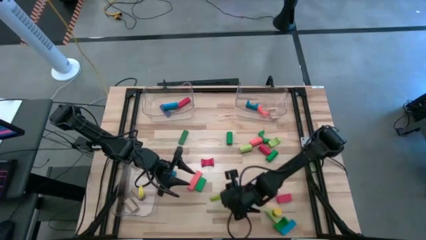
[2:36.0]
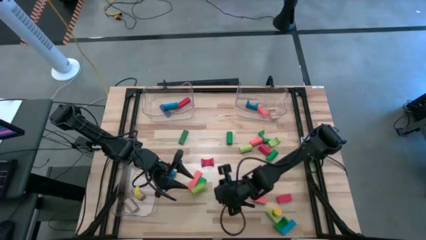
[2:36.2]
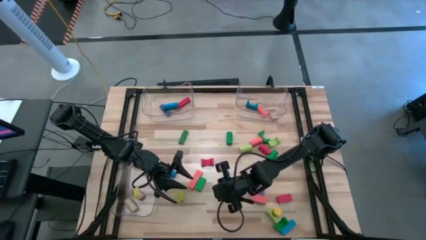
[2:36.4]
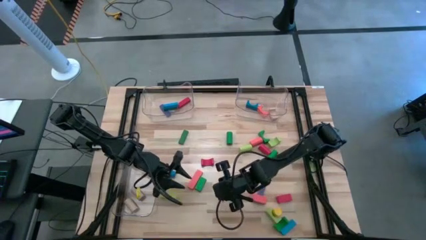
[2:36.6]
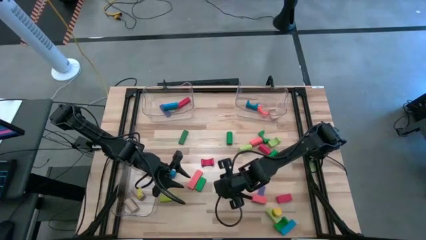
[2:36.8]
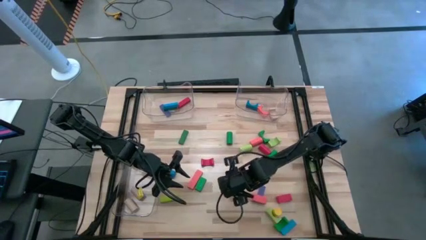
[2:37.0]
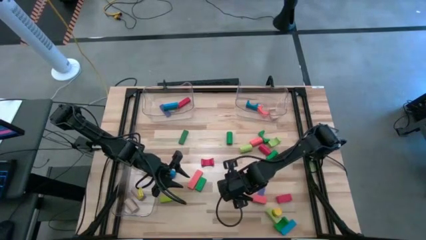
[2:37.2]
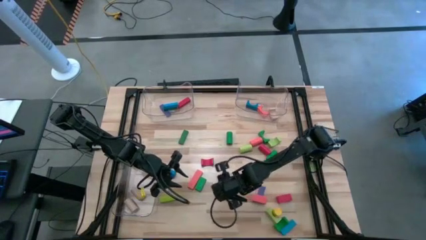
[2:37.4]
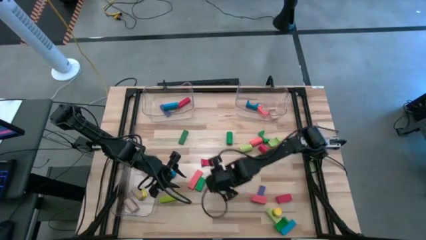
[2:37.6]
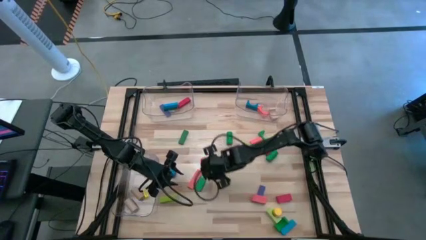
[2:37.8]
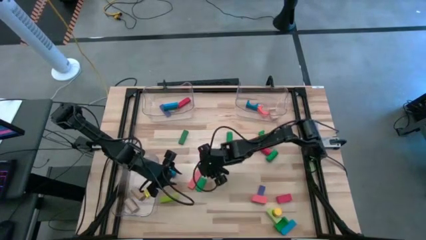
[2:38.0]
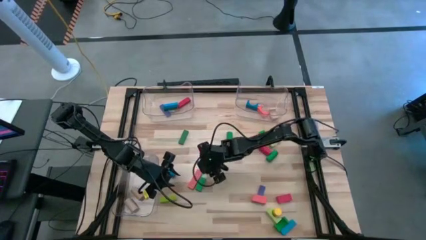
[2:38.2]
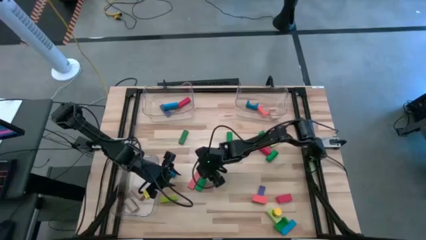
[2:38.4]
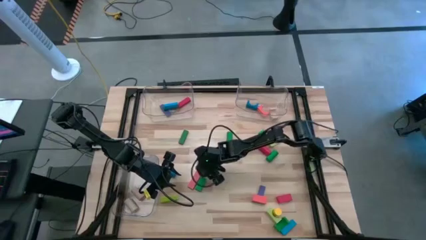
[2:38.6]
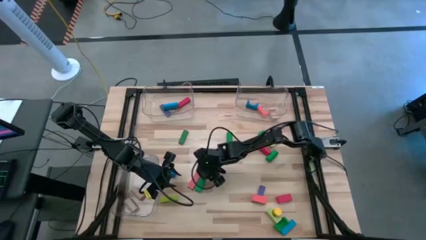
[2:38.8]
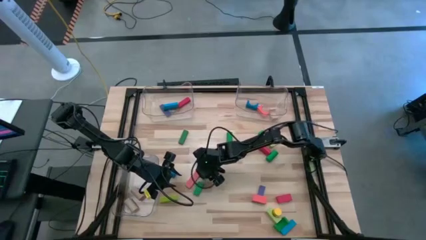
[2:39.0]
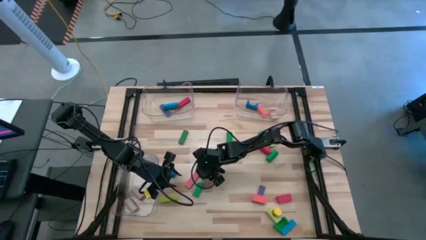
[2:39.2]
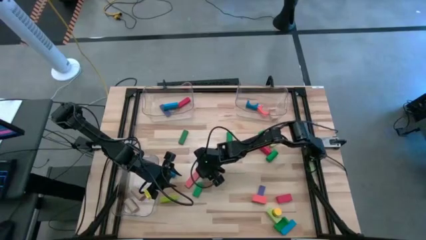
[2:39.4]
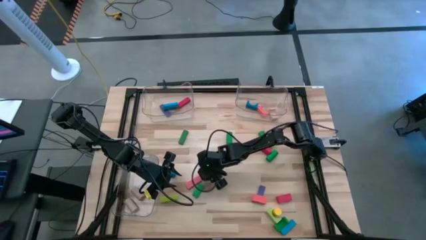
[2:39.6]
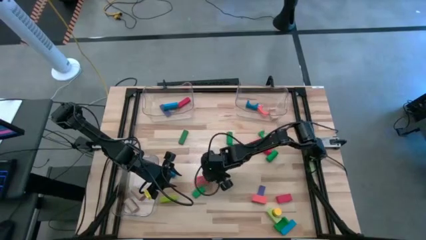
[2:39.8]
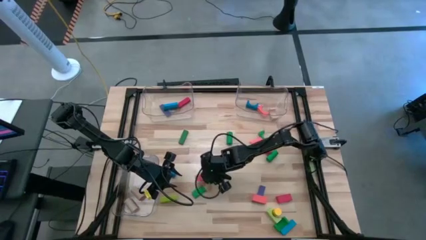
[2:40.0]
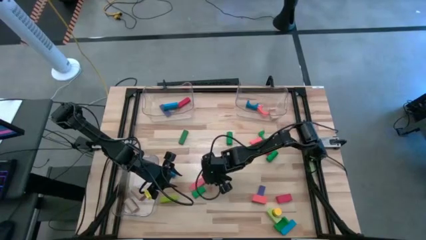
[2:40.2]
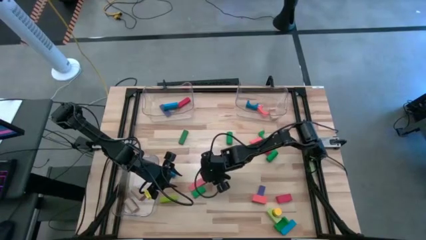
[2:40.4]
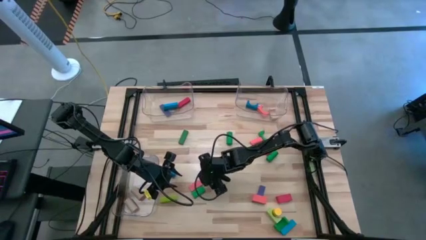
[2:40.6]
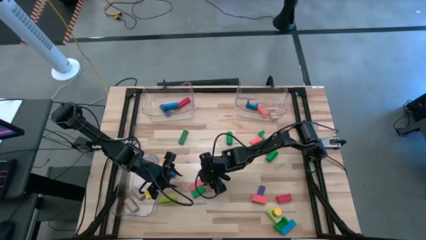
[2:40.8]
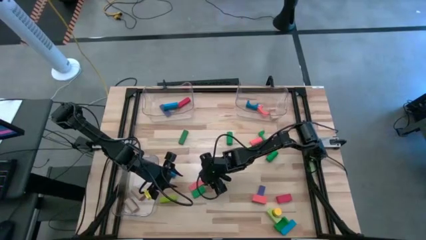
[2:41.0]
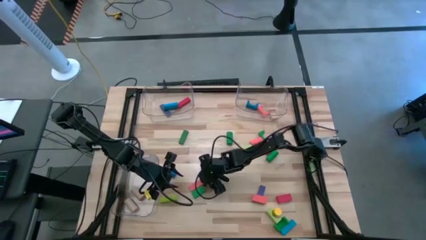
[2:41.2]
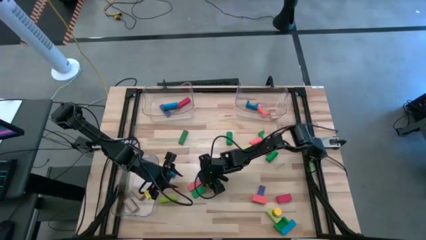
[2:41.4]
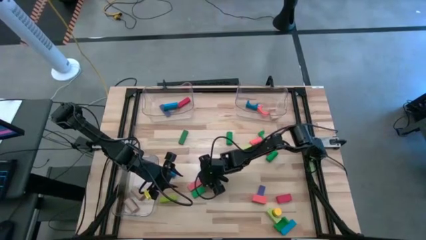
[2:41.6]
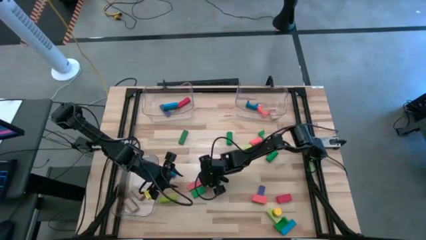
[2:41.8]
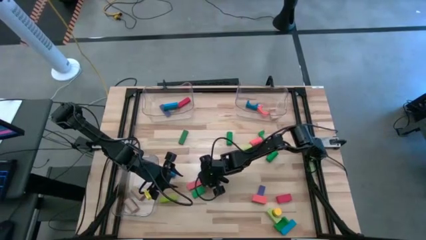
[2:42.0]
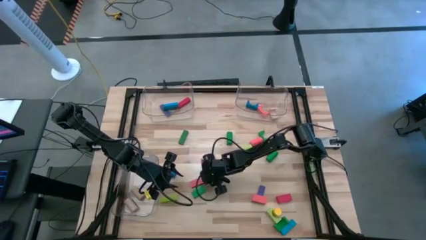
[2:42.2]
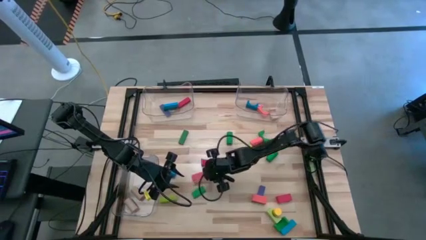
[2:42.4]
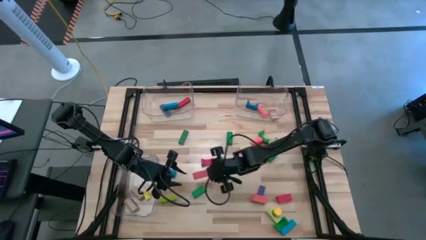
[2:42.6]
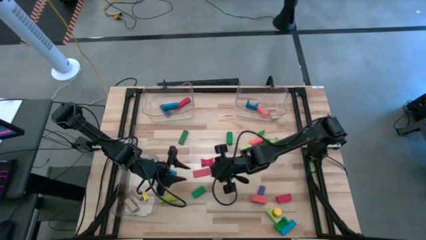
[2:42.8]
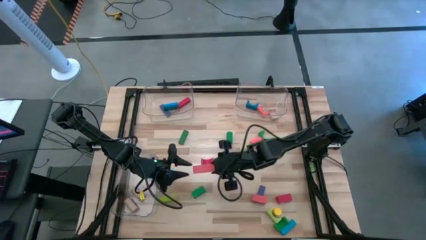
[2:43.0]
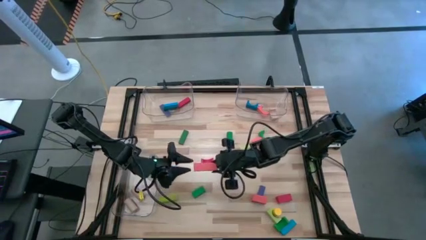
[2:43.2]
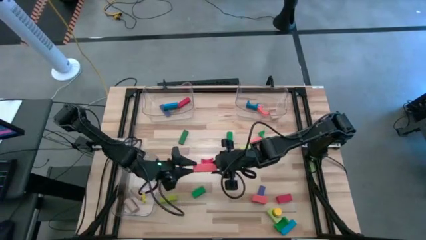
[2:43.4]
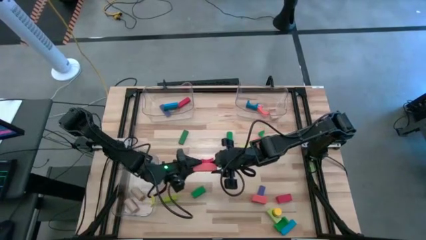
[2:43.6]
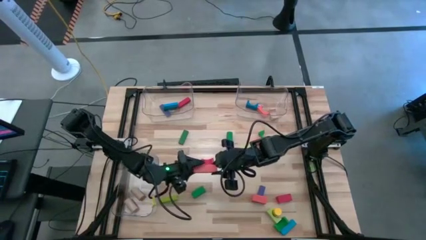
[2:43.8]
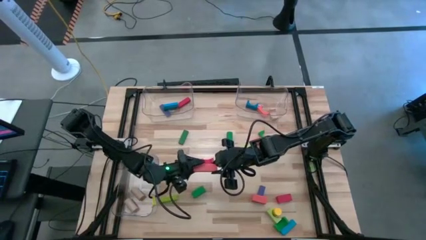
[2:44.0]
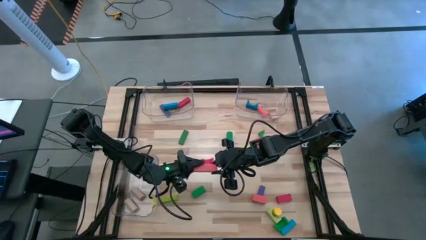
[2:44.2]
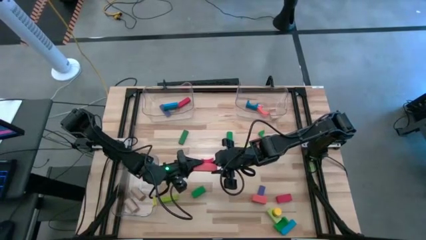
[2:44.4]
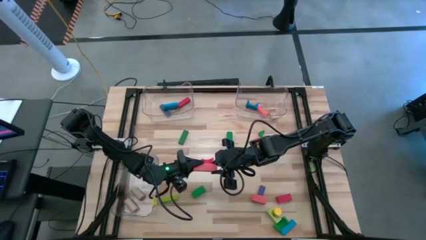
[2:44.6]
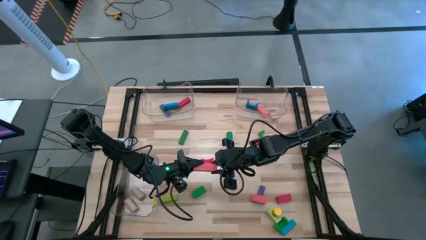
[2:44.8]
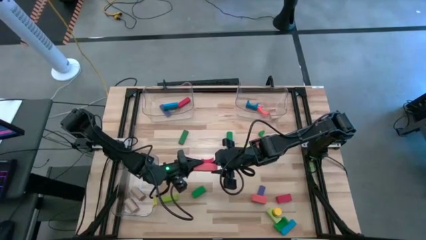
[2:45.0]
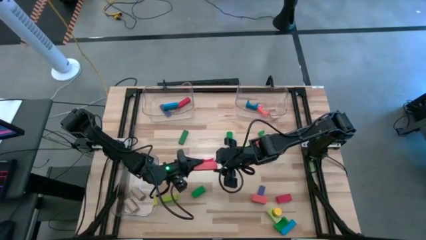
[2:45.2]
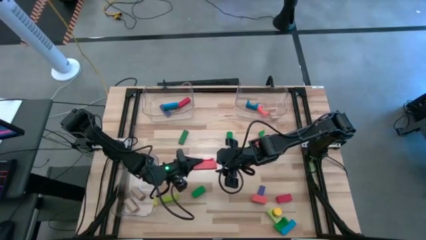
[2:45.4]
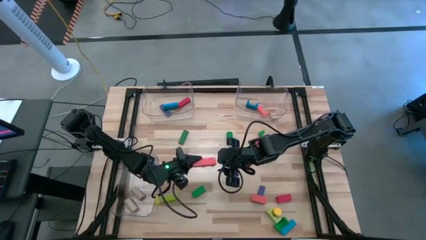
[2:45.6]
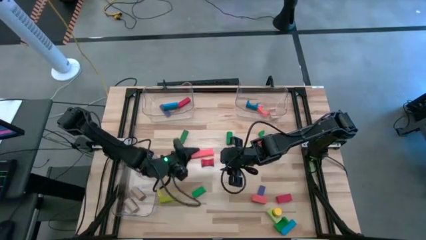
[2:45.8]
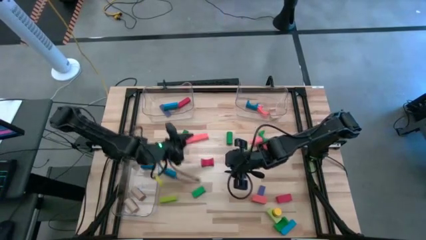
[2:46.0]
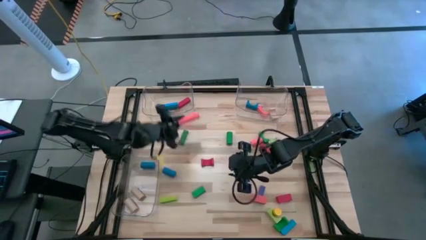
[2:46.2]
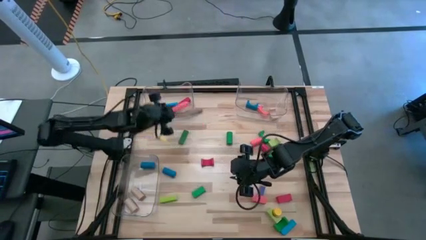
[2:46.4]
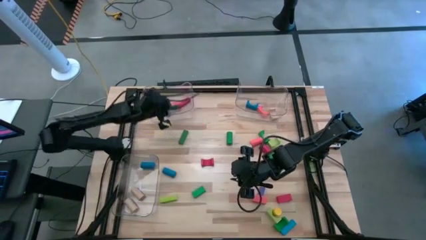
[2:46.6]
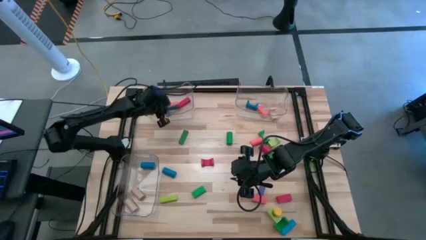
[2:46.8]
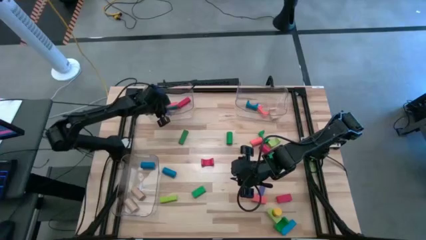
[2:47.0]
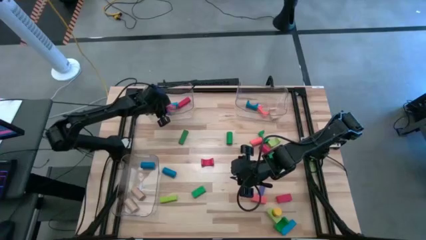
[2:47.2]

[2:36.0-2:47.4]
Task: Sort blocks by size
Put the orange rectangular block into the top left transparent bin

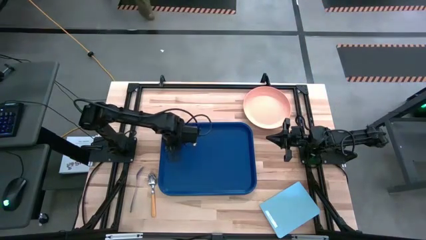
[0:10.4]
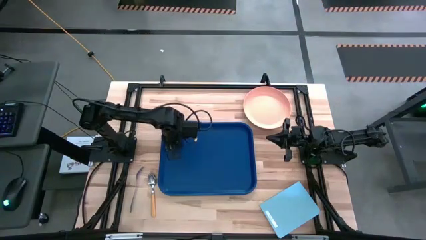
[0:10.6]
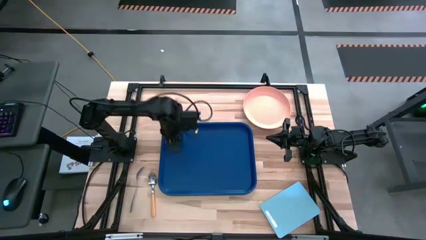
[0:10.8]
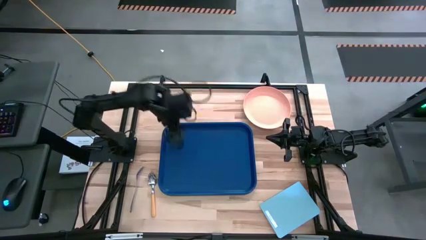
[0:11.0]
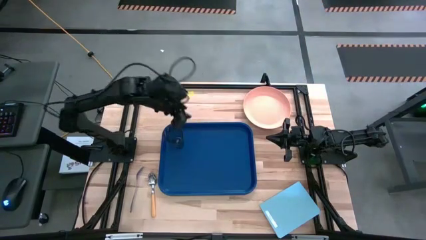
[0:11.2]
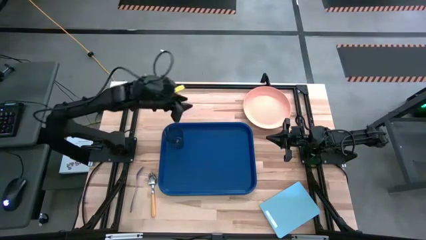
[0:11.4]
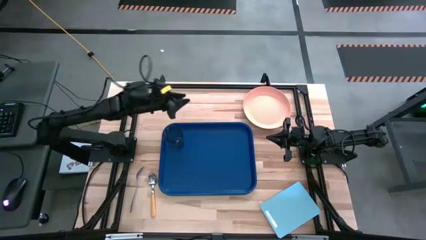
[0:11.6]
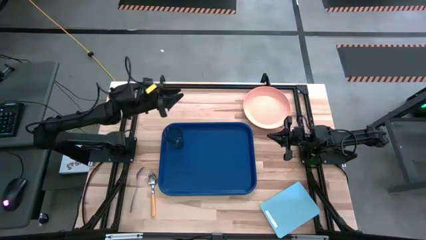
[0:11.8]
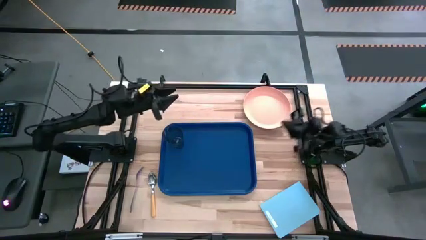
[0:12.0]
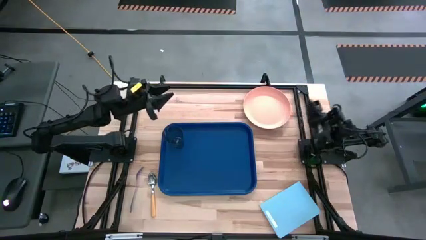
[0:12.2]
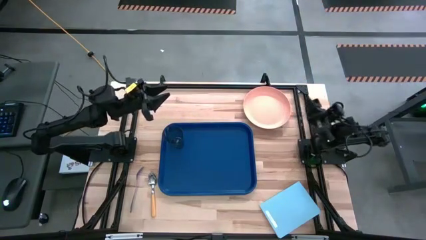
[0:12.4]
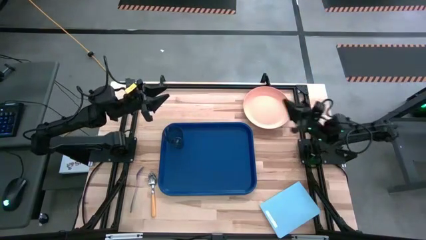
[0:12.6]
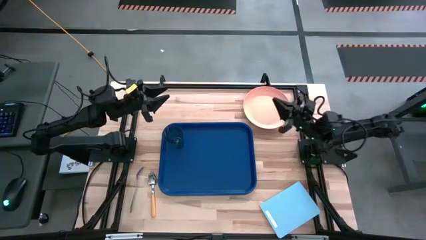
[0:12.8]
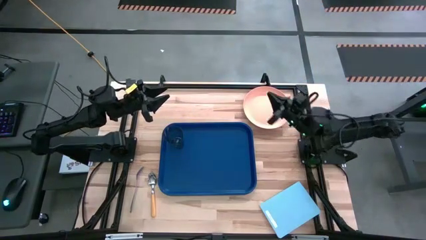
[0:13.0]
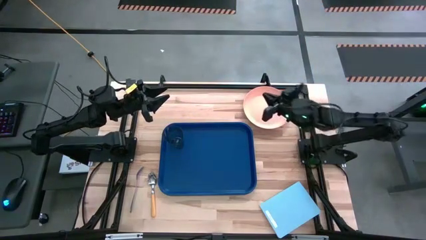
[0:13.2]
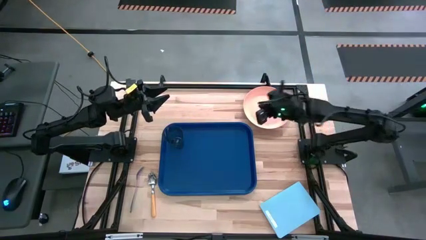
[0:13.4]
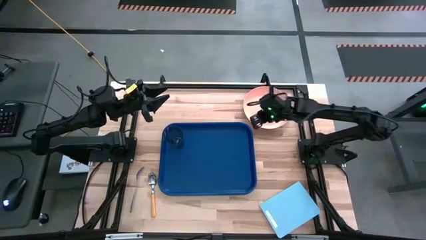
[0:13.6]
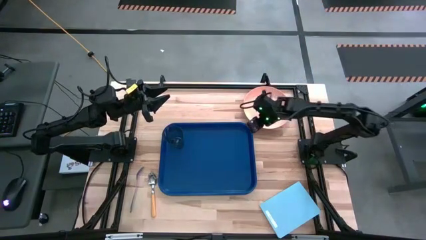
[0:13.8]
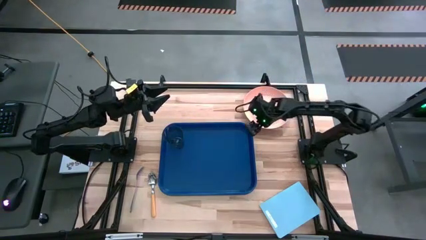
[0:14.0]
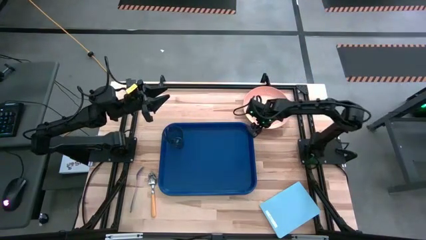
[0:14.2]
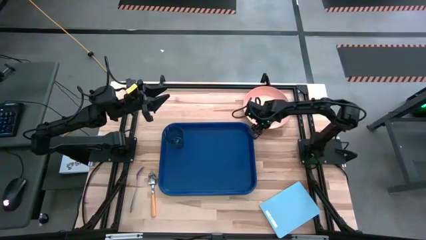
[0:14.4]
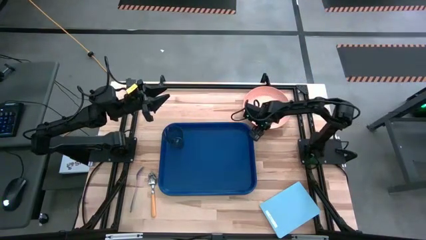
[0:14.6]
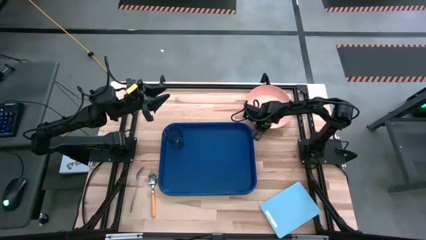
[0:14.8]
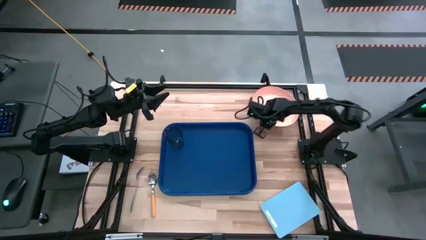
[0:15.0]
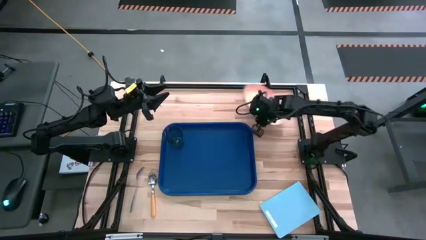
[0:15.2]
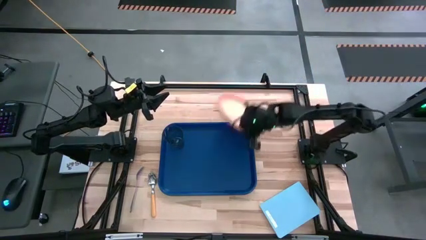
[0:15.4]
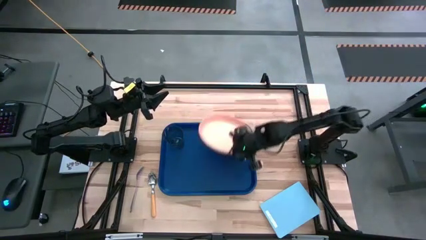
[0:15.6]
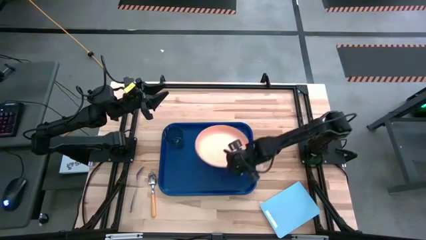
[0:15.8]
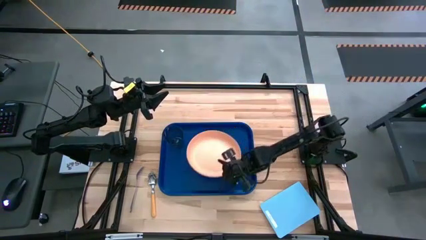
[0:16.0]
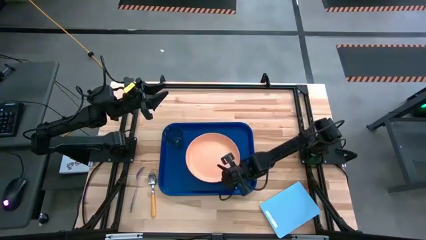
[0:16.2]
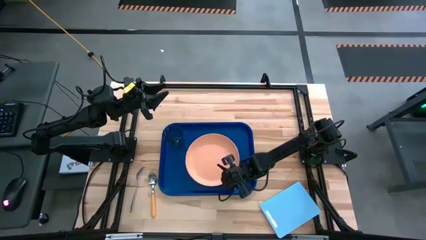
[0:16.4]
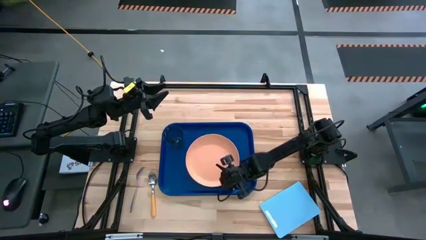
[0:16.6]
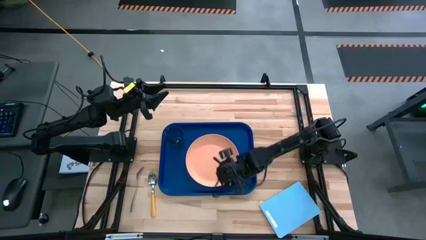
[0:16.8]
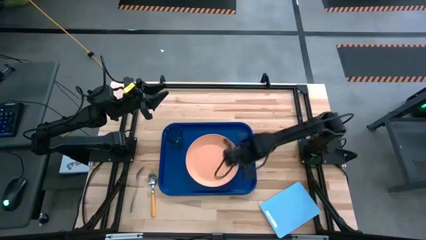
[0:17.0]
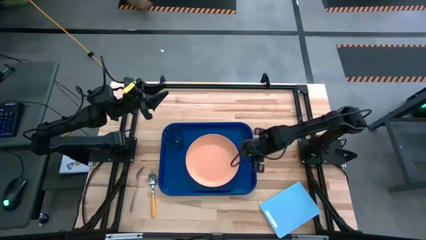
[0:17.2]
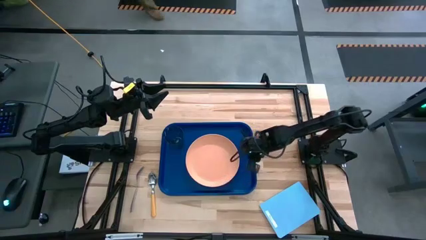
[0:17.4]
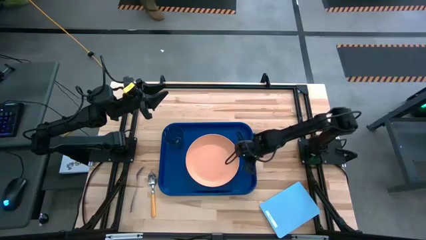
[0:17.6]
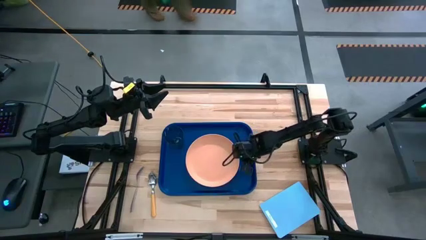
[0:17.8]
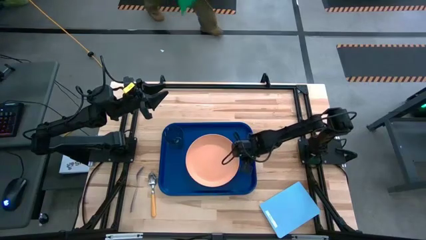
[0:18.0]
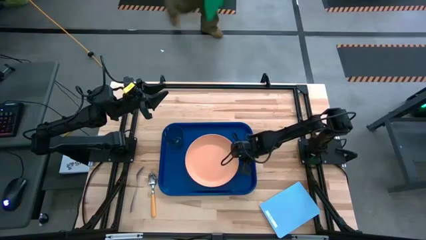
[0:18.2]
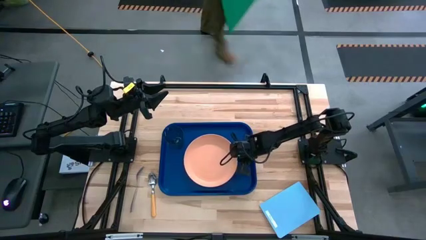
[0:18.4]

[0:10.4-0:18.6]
Task: Pick and place plate/cup/fork/spoon on tray
Put the orange plate on the blue serving tray to the bottom right of the cup
